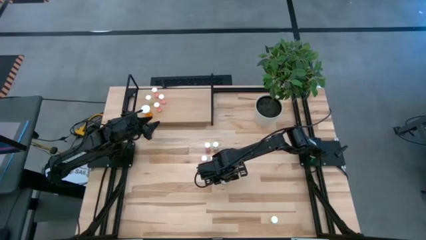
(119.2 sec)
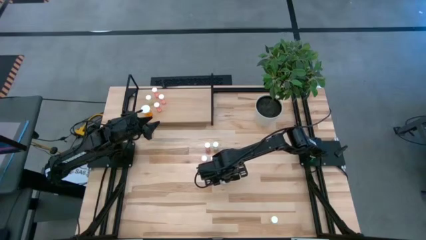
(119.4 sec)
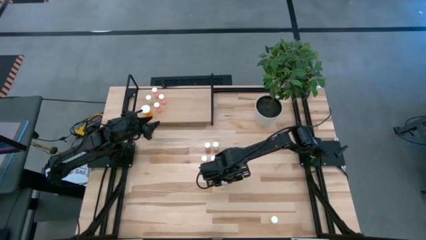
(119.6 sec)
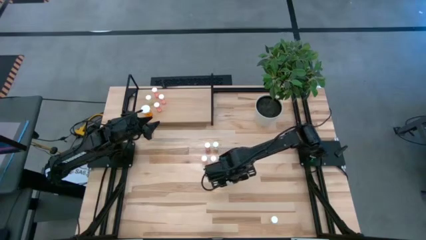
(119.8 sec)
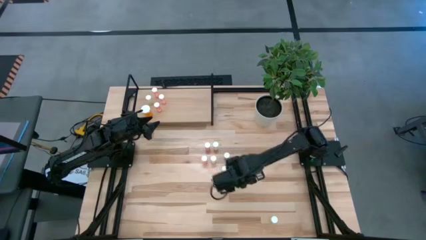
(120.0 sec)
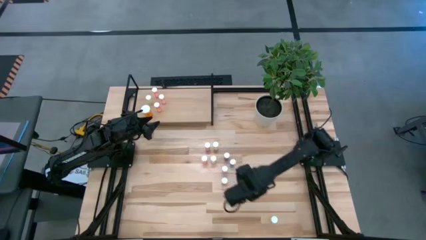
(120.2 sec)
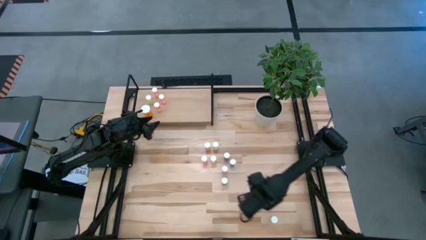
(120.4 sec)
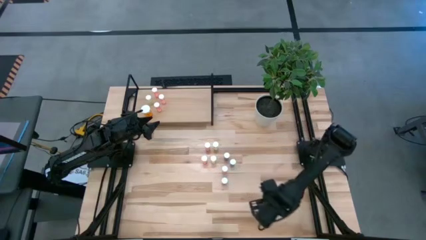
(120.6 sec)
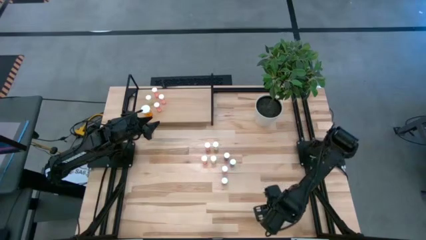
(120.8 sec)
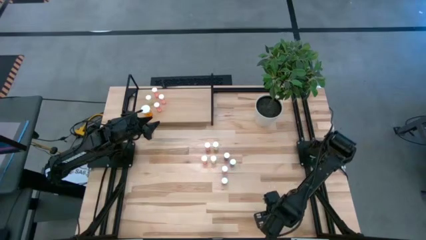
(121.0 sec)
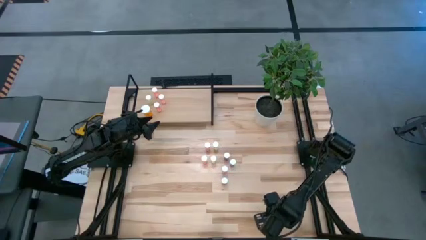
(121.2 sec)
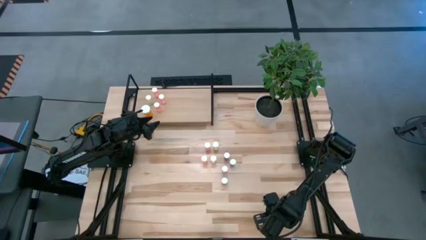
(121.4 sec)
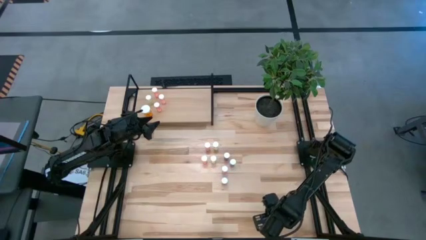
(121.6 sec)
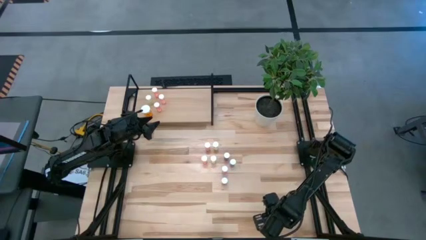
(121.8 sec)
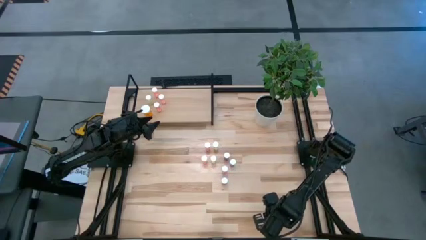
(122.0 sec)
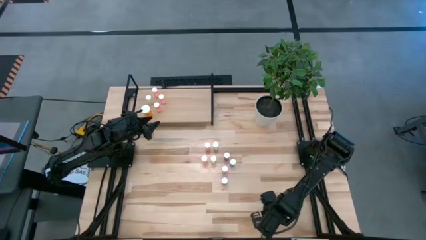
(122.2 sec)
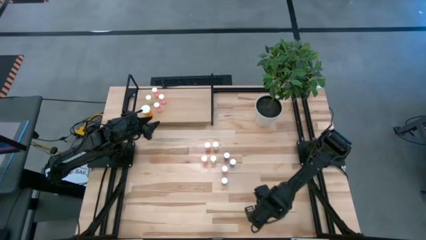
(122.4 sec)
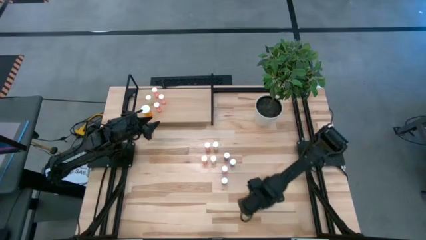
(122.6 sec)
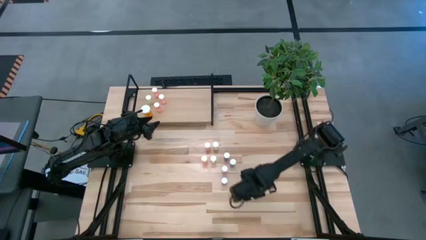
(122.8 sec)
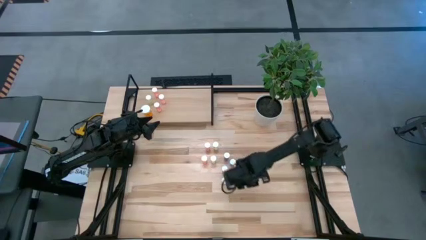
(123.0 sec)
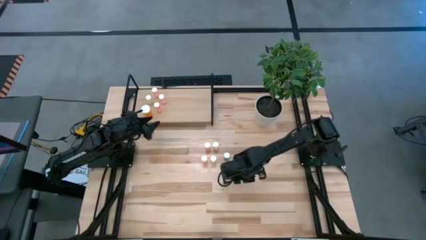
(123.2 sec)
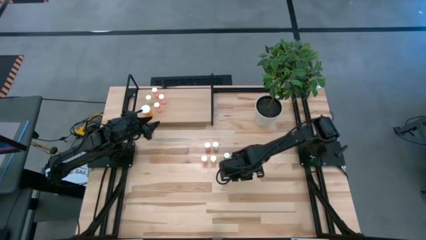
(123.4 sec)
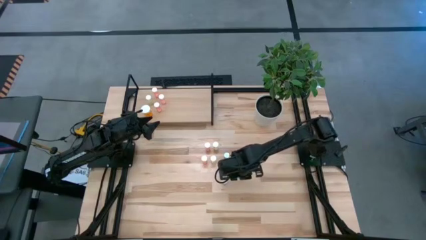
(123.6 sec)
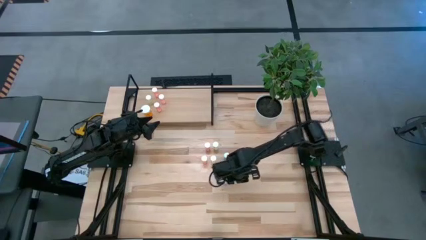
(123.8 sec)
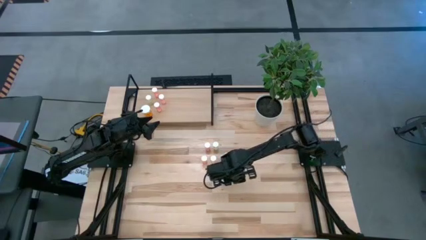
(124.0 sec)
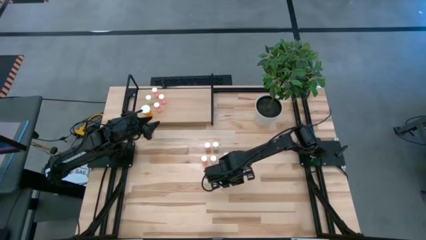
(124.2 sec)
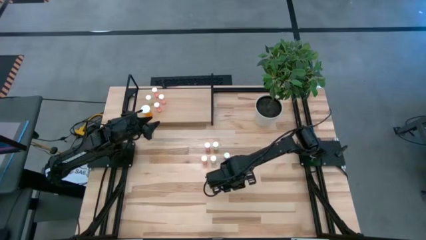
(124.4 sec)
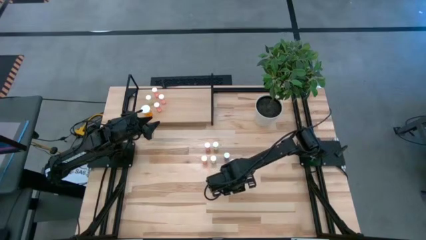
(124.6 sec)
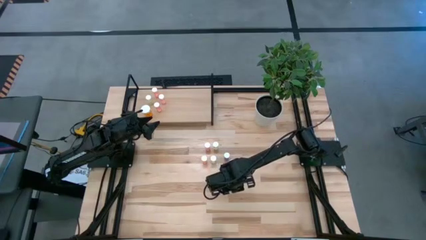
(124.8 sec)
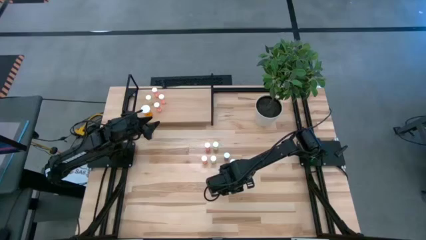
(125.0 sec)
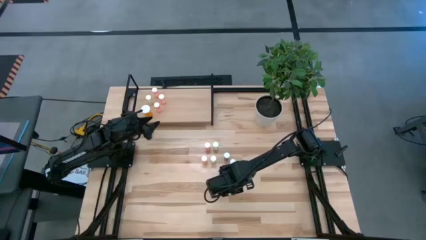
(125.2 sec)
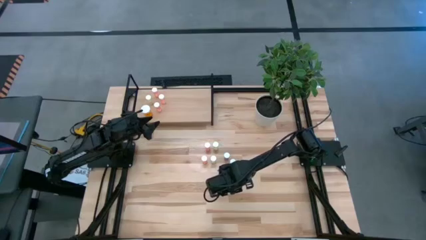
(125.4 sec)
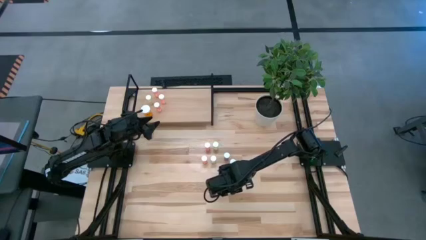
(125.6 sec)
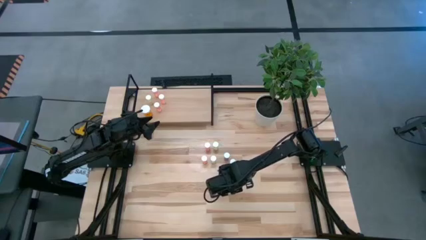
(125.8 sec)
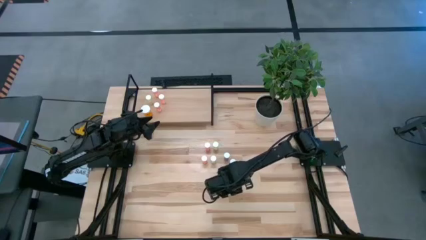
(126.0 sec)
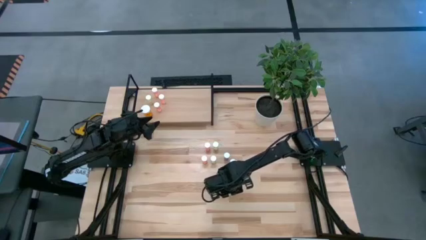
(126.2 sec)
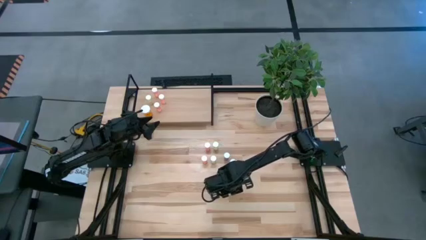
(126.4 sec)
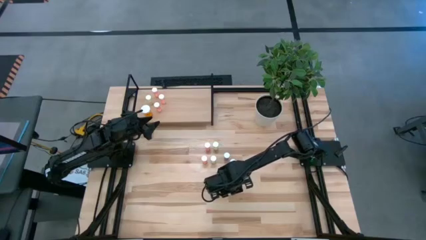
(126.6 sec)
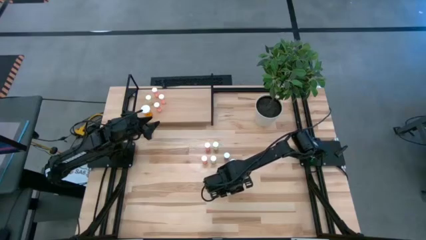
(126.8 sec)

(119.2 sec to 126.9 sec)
Task: Pick and place medicine bottles onto shelf by color
Move the yellow pill bottle to the center

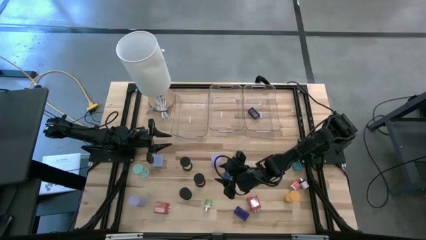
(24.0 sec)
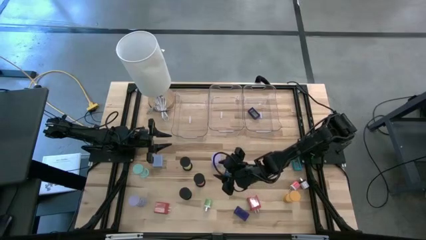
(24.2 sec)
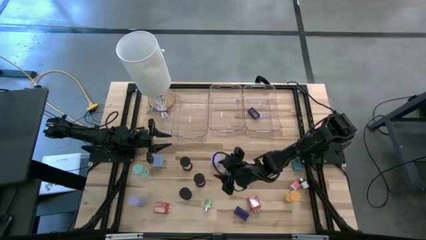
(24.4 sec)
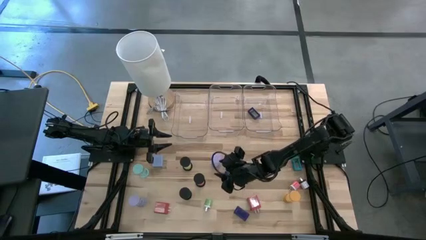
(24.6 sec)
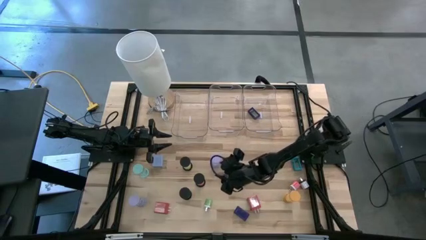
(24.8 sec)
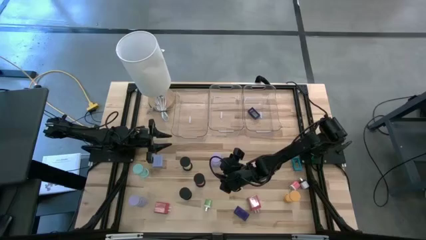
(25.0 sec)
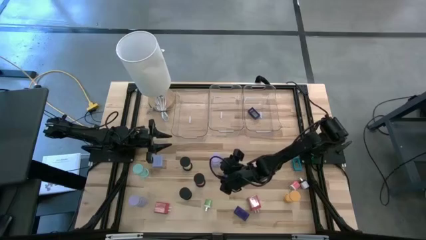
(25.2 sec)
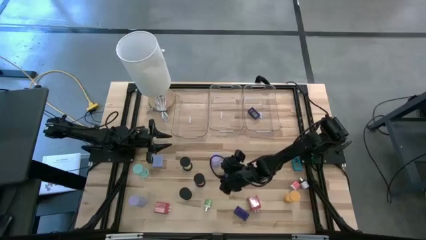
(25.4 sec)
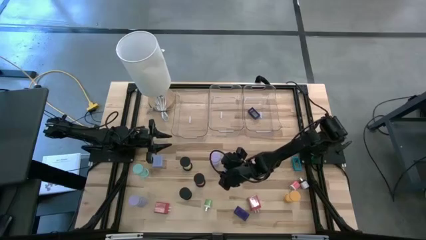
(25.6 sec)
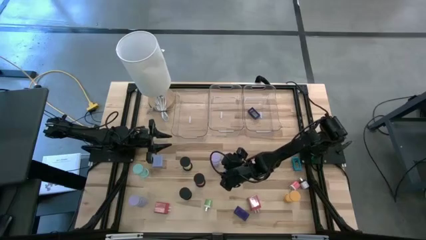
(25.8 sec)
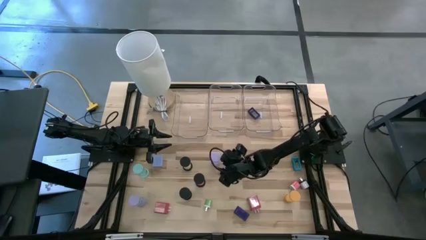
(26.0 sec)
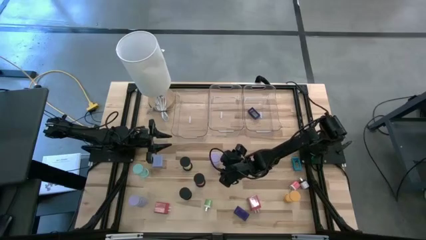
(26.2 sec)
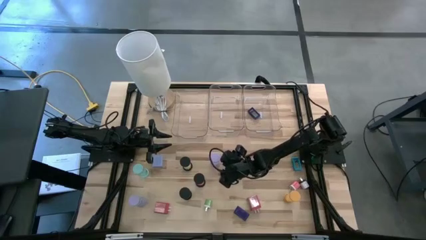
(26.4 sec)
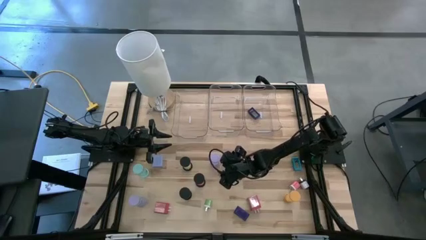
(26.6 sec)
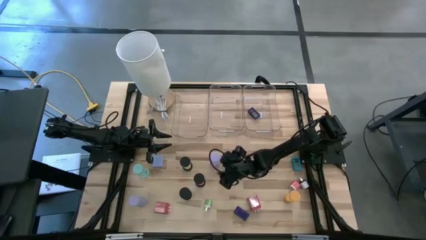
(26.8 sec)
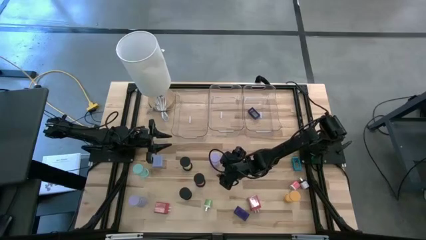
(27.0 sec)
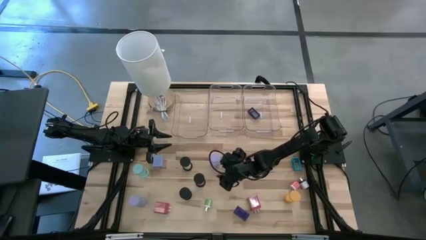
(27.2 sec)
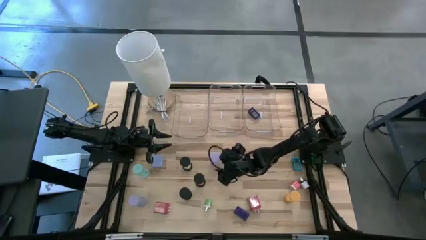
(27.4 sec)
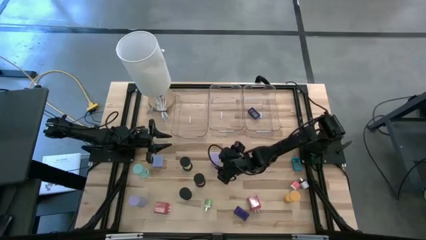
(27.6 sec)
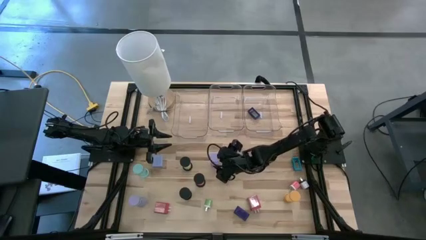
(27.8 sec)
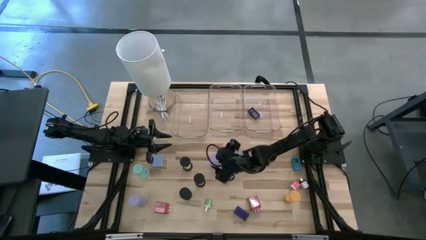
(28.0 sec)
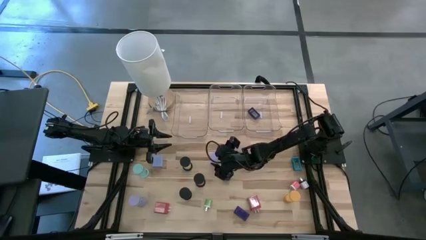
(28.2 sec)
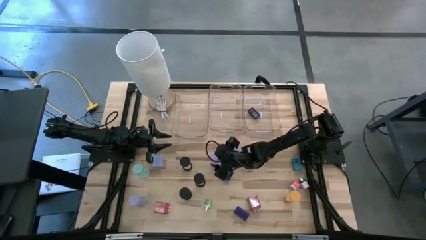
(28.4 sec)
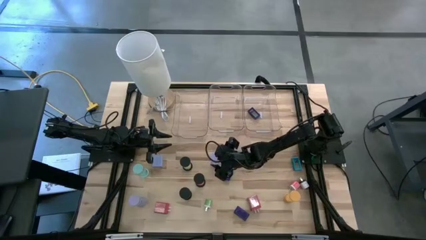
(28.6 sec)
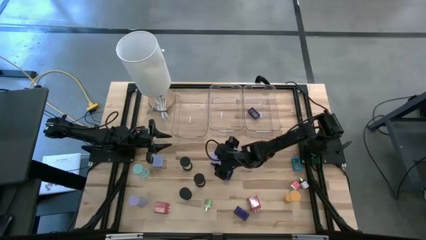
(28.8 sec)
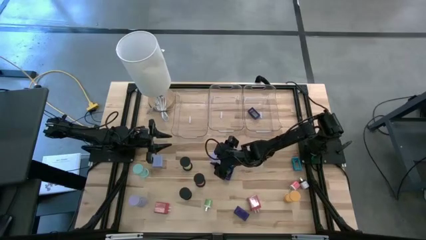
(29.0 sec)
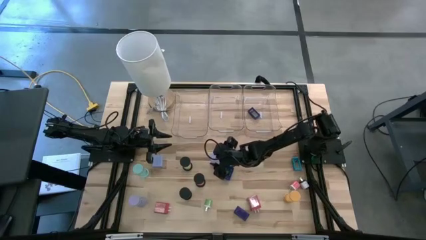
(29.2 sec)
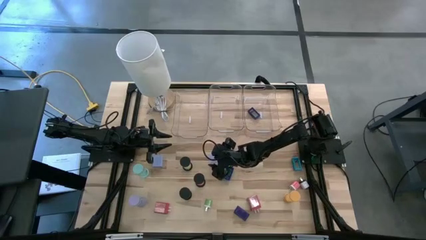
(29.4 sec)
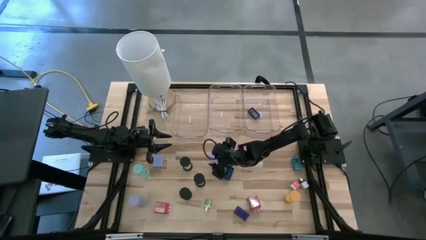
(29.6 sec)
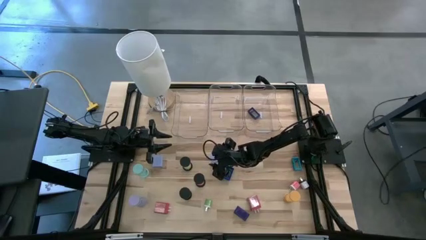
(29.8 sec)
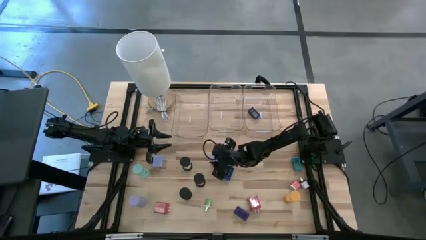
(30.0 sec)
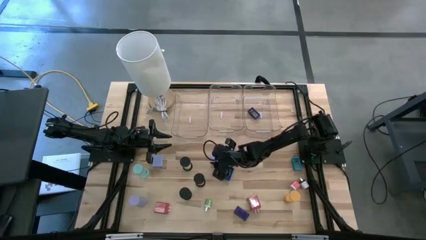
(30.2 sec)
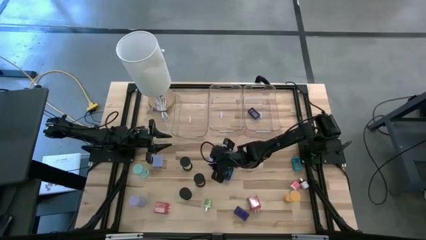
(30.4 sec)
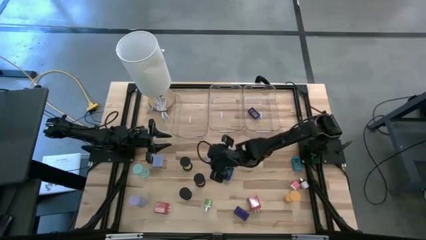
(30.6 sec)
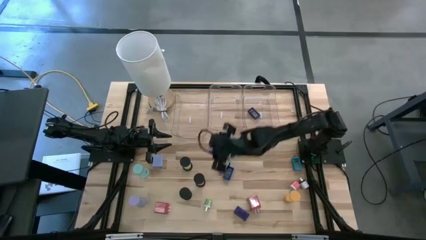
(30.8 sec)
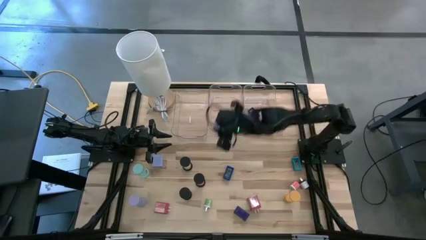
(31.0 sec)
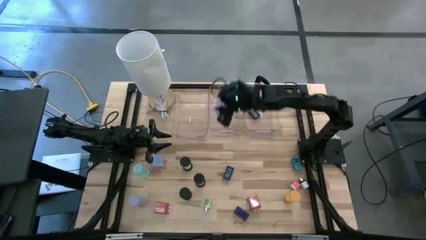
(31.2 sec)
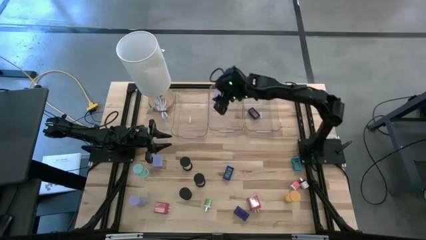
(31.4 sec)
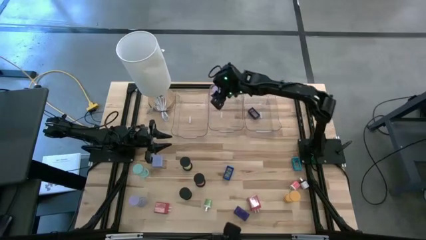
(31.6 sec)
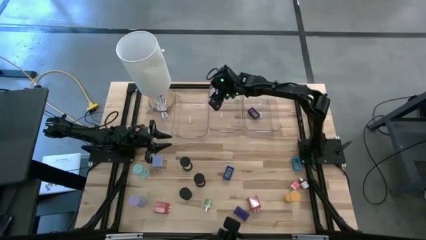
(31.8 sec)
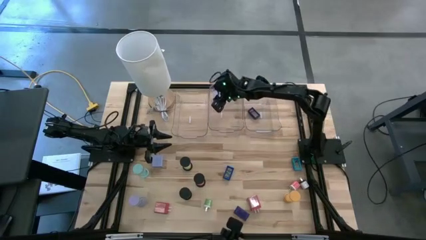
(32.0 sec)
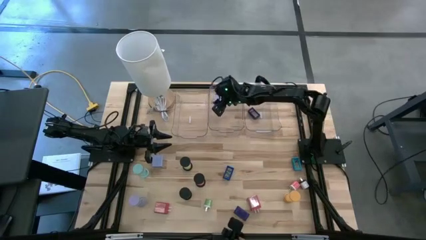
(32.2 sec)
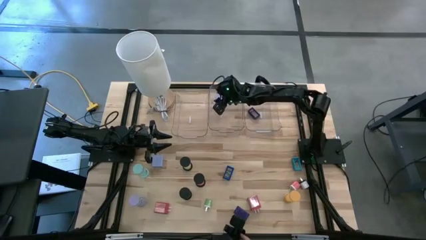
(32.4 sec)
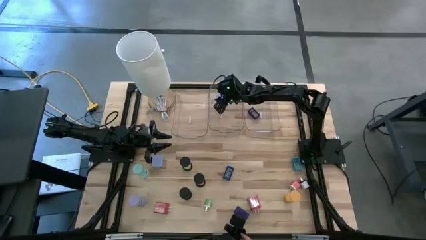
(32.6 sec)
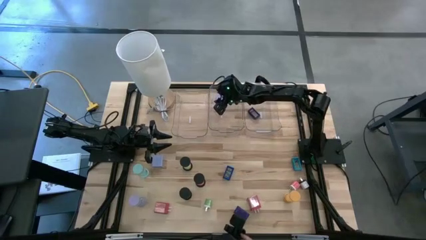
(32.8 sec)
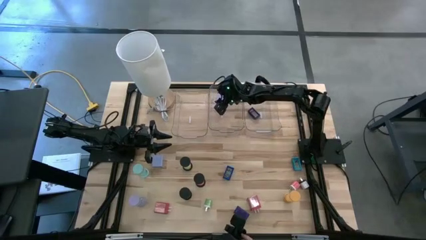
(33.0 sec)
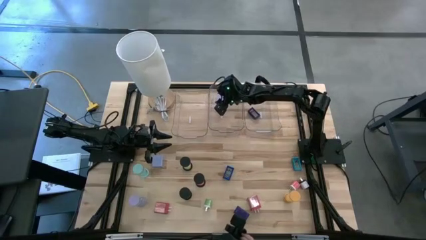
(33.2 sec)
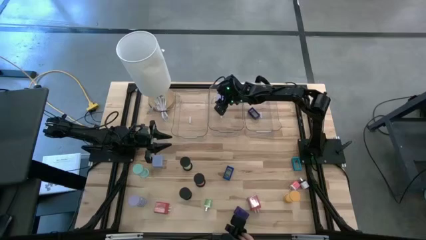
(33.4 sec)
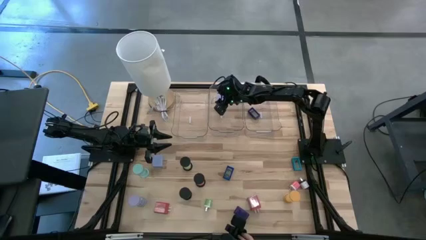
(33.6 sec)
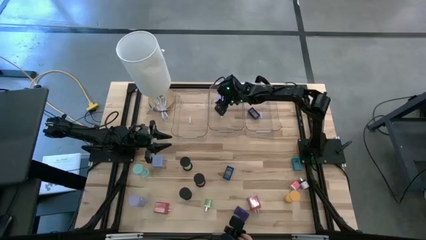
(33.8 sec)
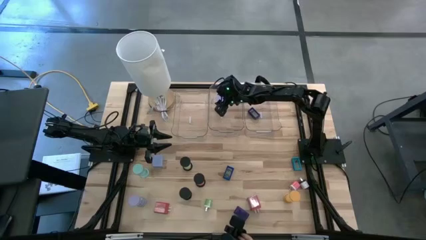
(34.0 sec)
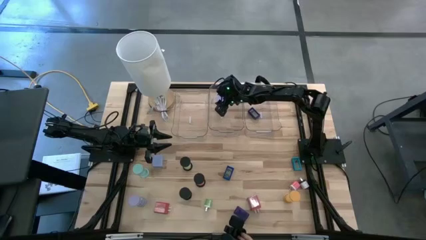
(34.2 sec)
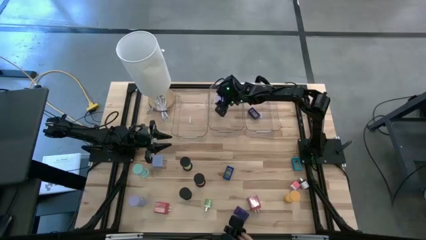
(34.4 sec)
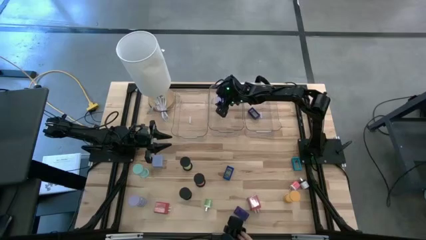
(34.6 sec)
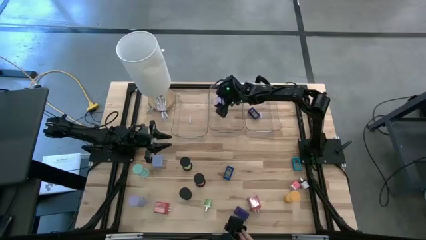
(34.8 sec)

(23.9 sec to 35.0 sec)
Task: Pick & Place Office items
Put the top violet hourglass into the middle transparent bin
